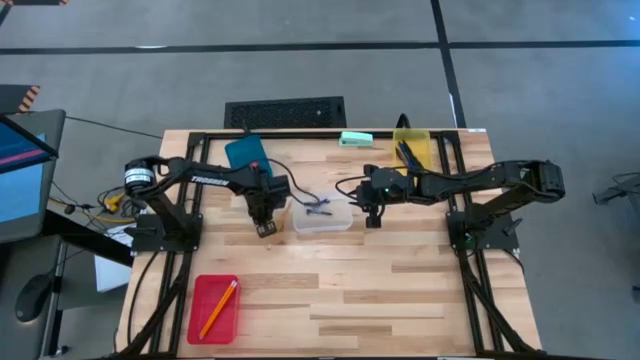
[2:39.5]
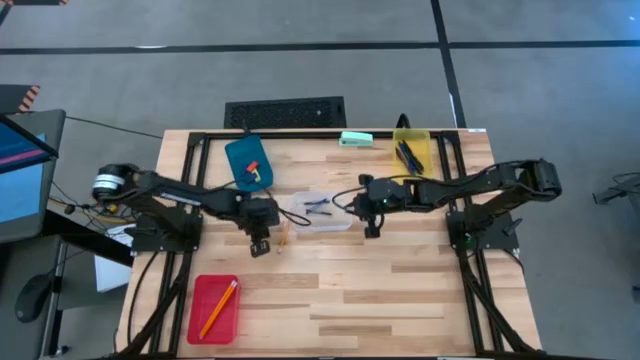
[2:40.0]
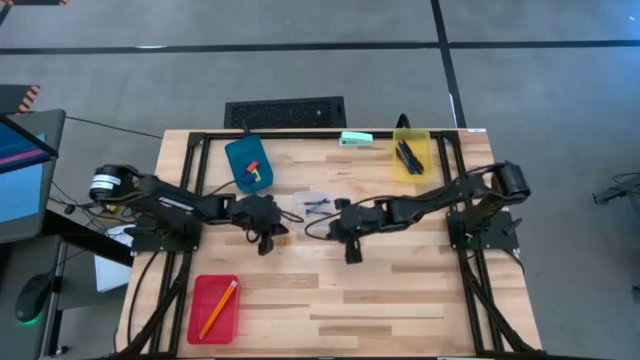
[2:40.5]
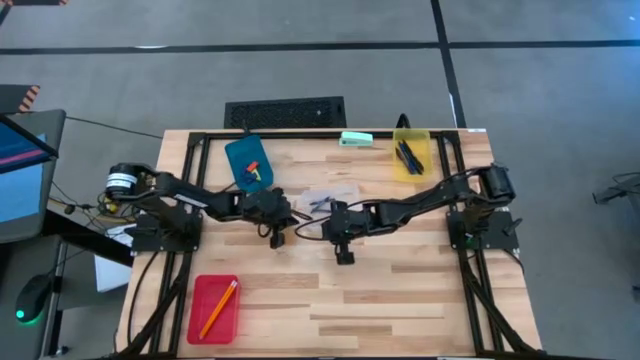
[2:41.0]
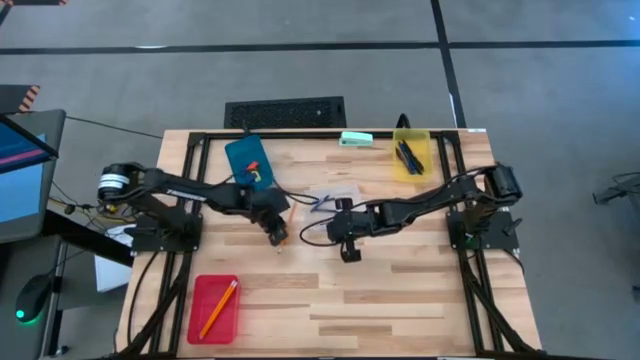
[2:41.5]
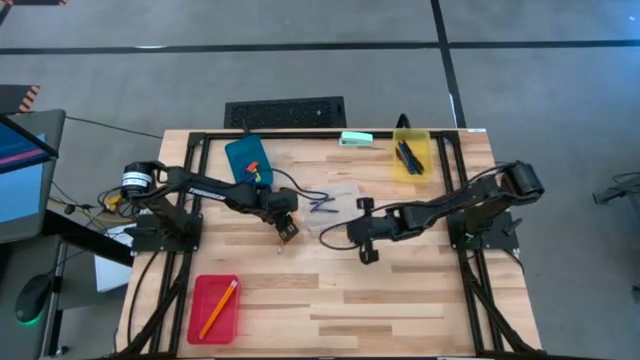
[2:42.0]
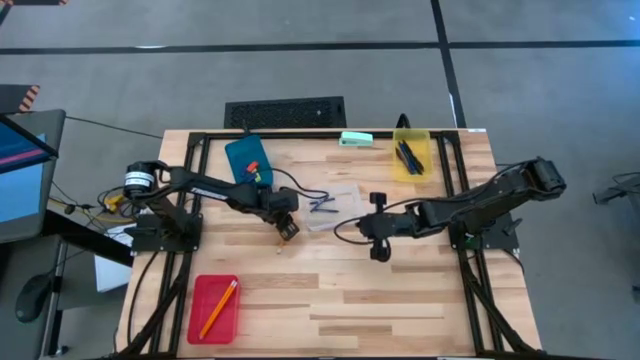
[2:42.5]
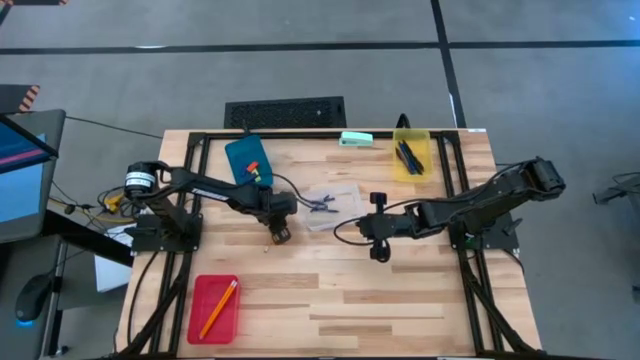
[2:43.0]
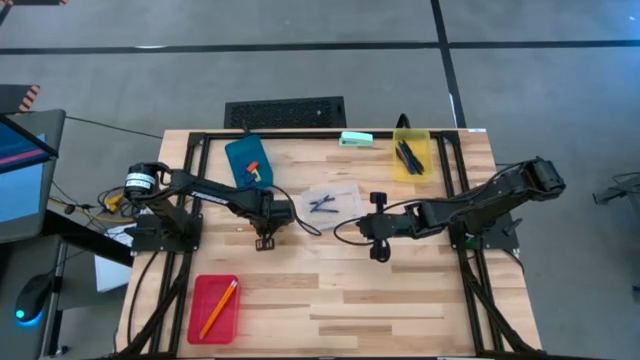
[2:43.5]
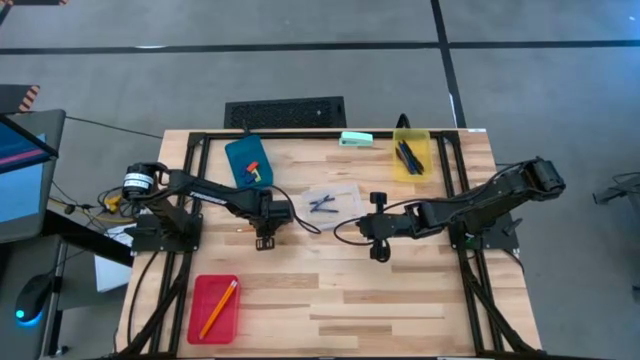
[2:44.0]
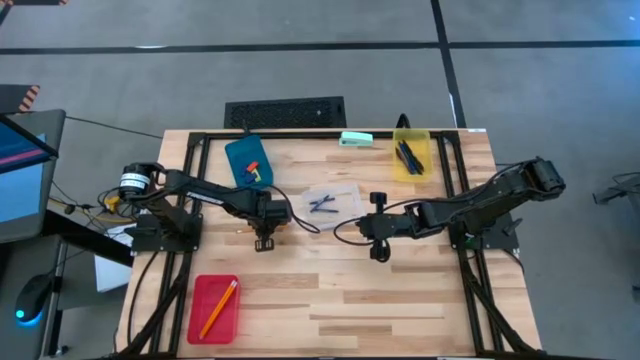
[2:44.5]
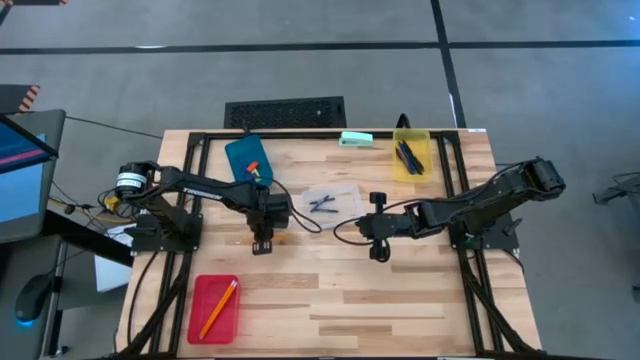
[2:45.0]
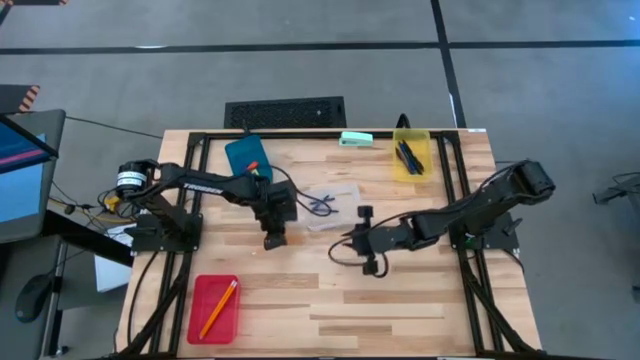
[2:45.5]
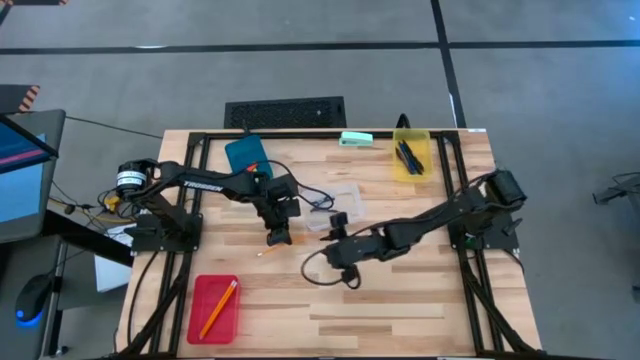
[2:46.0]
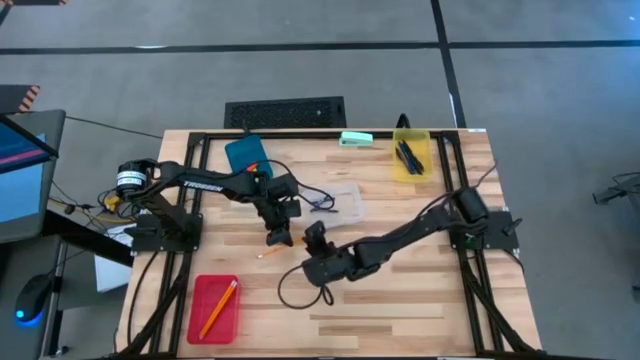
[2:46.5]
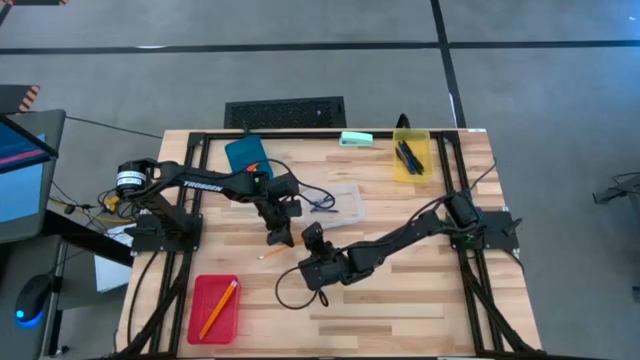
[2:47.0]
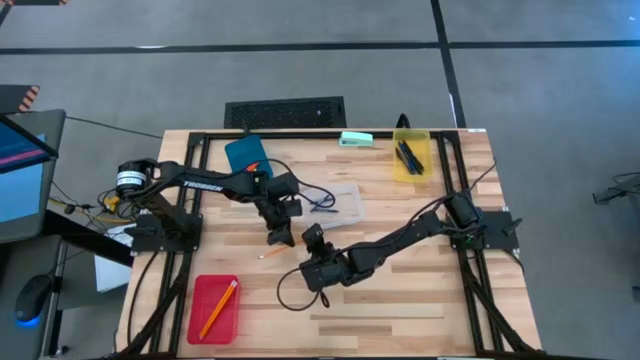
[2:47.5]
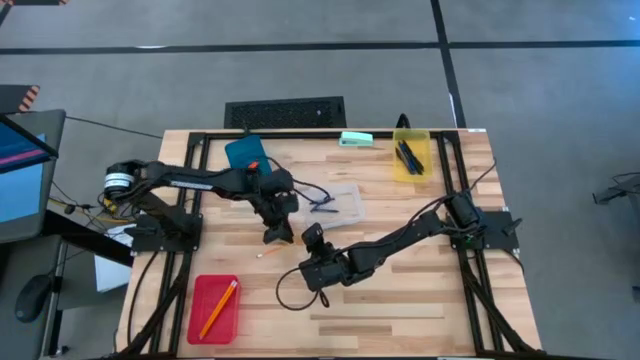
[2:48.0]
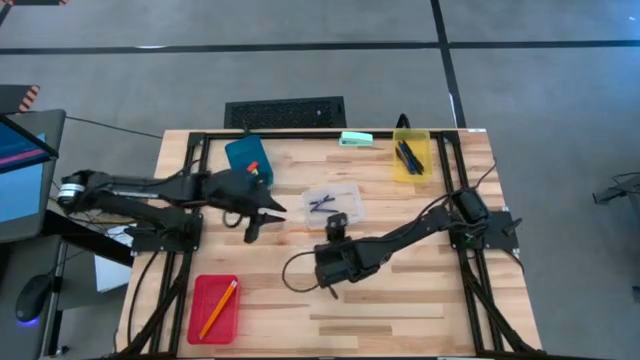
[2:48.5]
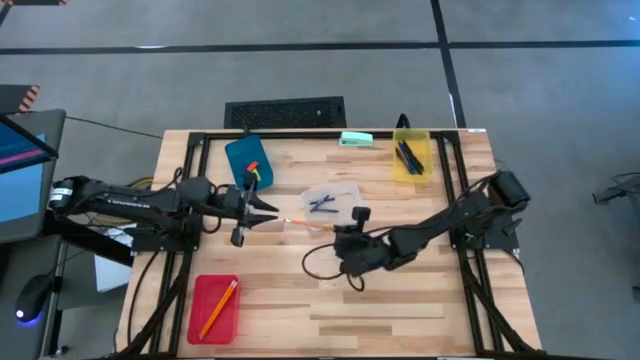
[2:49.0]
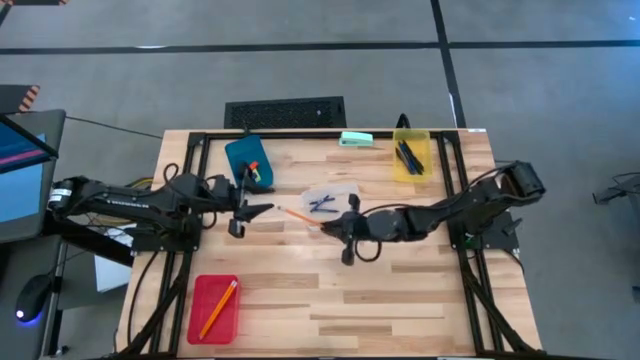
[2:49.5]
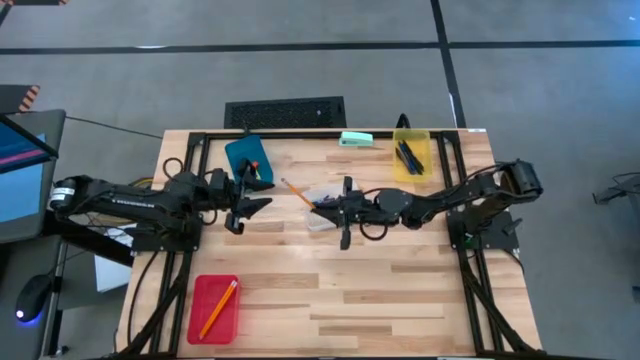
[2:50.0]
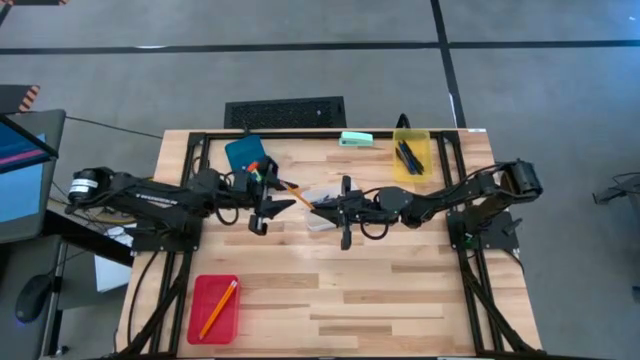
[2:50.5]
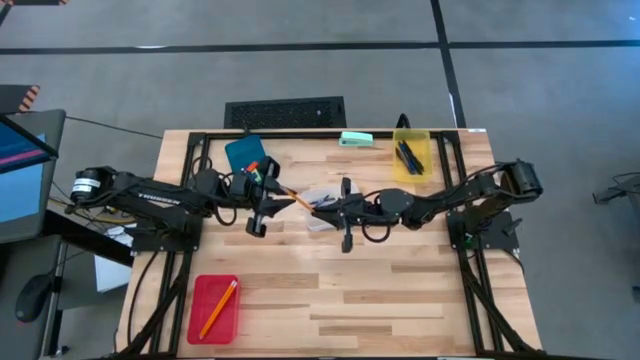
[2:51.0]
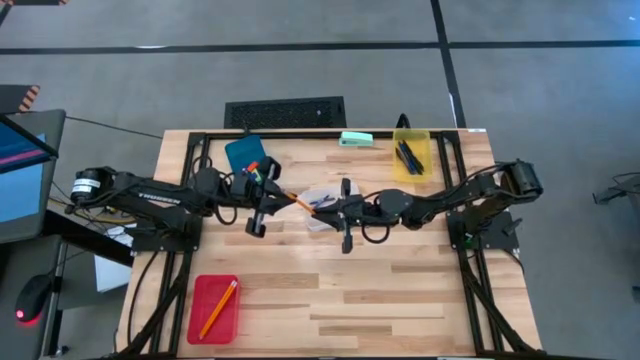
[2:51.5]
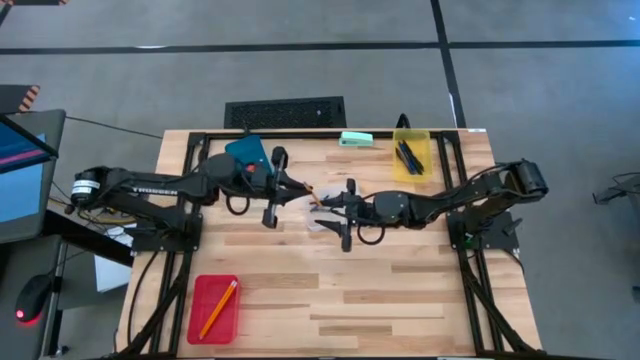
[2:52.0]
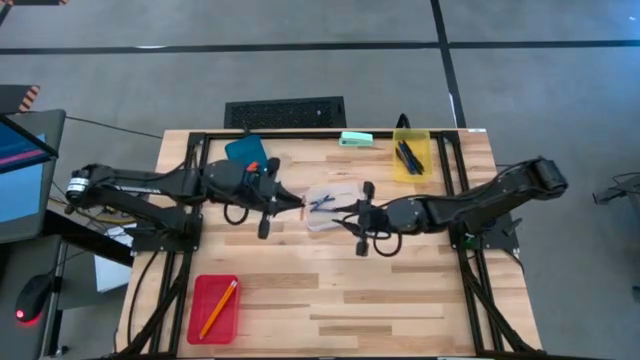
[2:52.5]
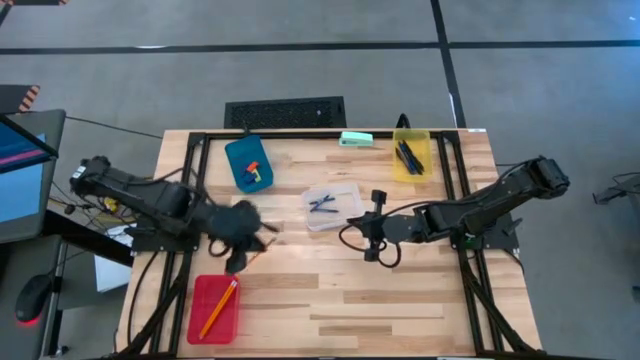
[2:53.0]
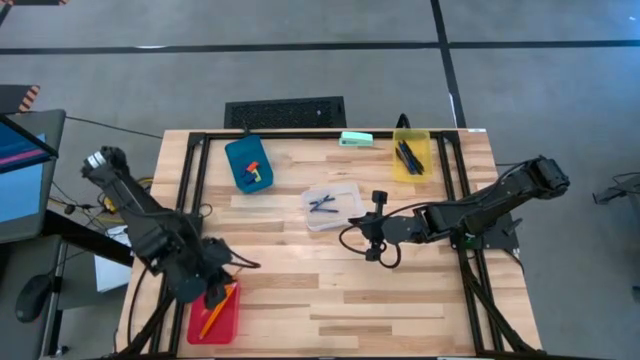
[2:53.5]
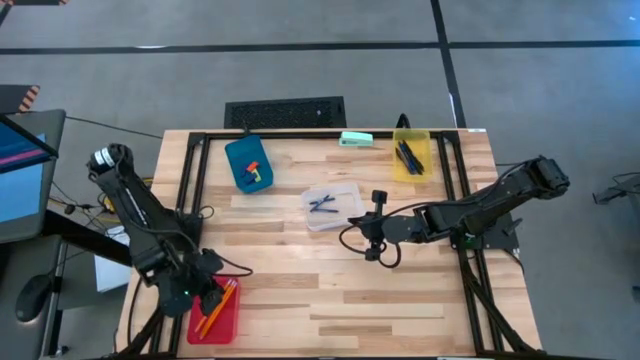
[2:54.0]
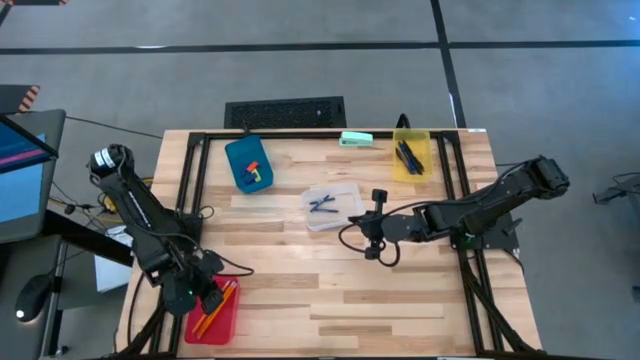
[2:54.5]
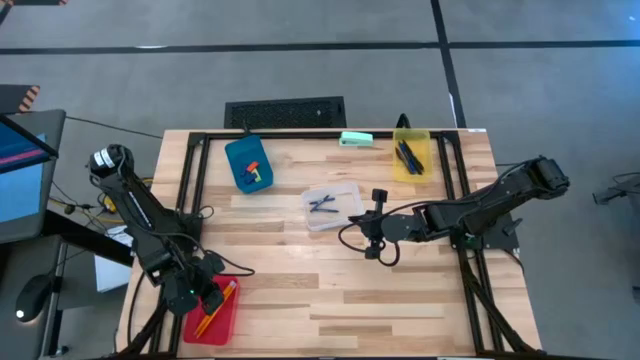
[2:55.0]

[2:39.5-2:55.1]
Task: Sort crayons/erasers/pens/pencils in bins
Put the yellow pencil into the red bin

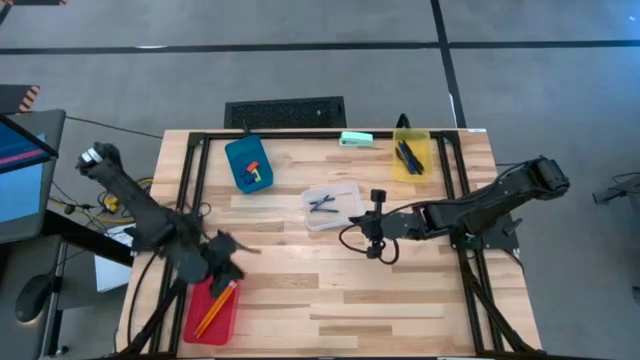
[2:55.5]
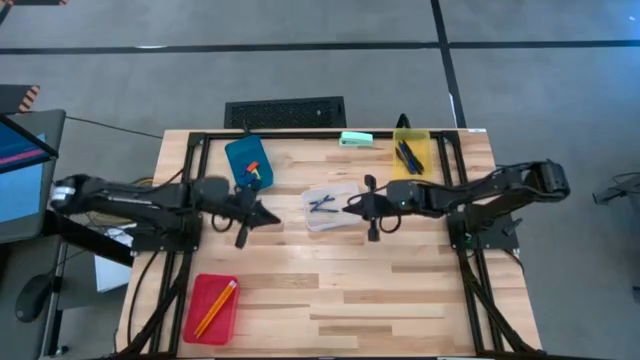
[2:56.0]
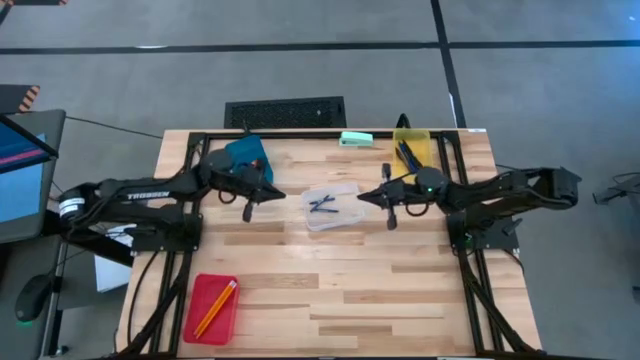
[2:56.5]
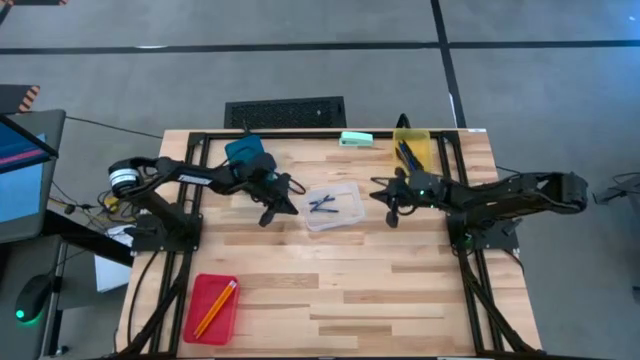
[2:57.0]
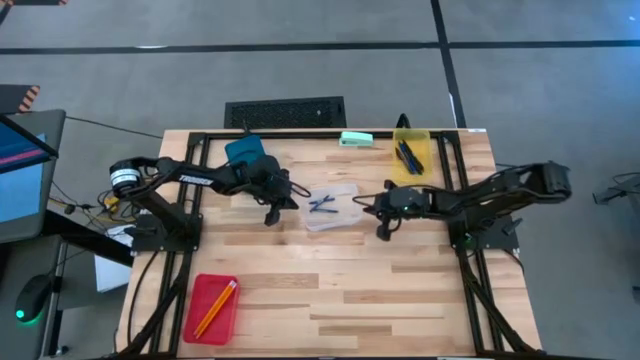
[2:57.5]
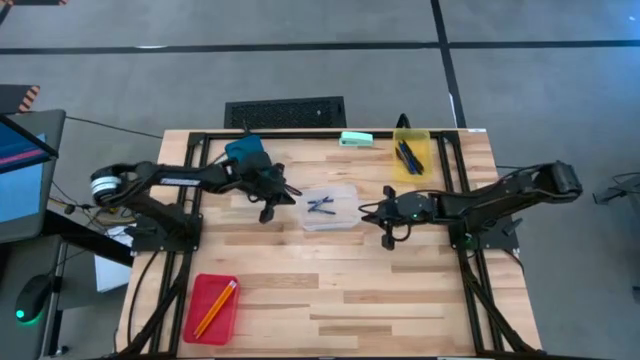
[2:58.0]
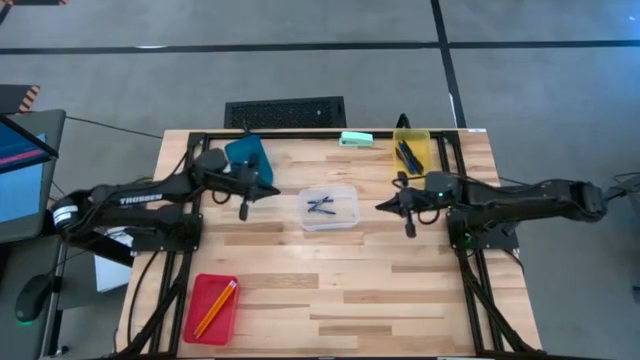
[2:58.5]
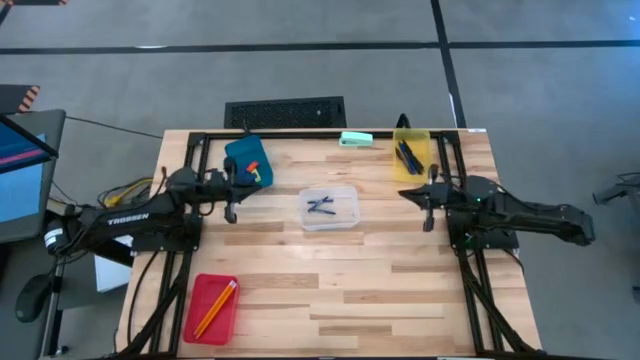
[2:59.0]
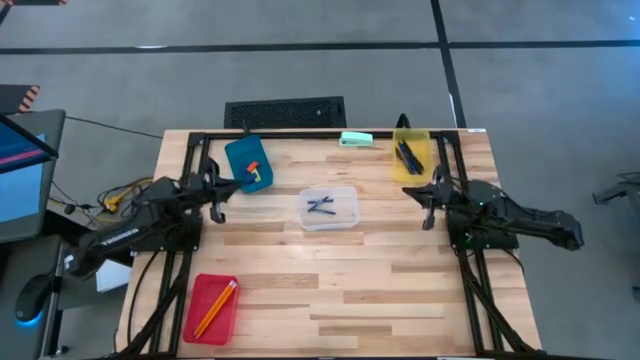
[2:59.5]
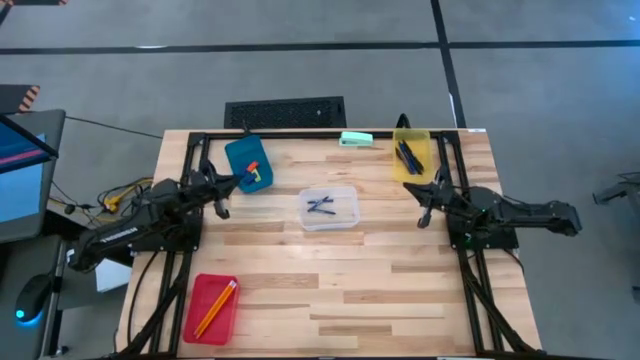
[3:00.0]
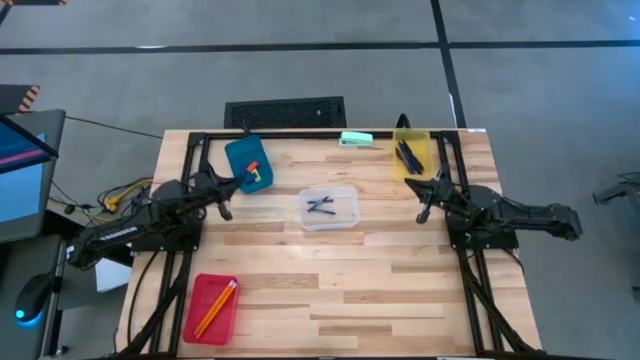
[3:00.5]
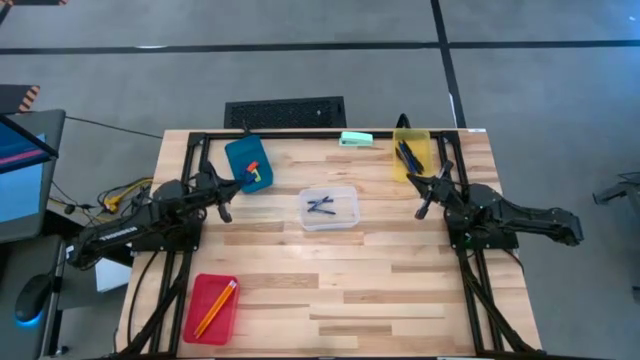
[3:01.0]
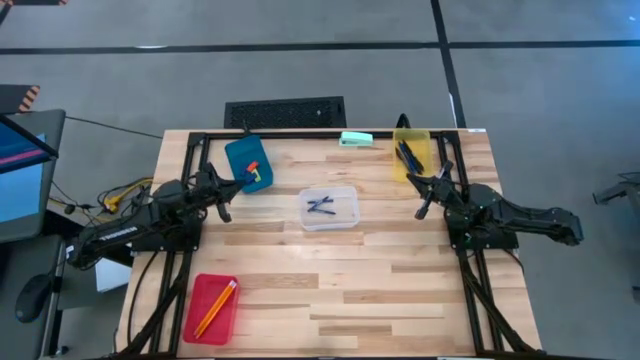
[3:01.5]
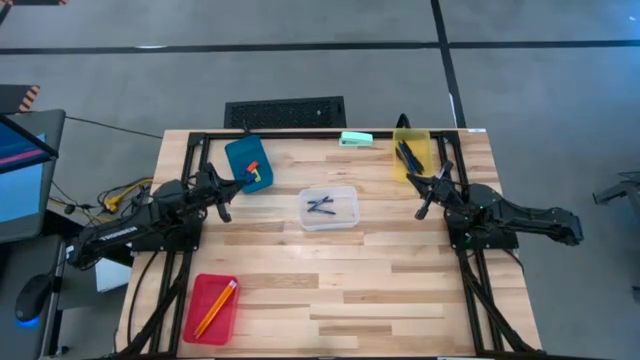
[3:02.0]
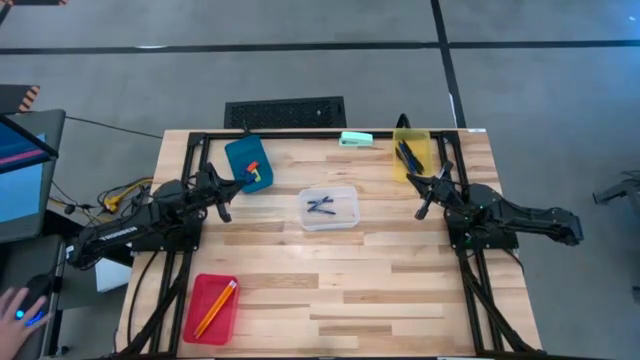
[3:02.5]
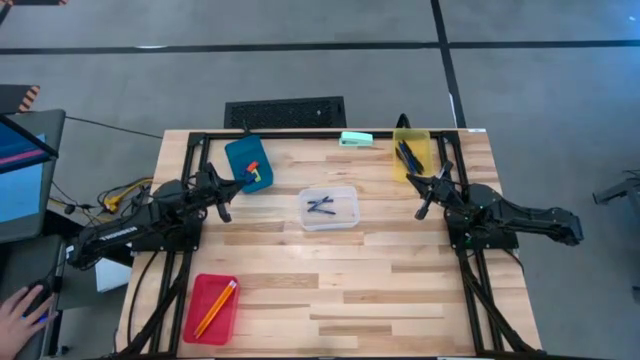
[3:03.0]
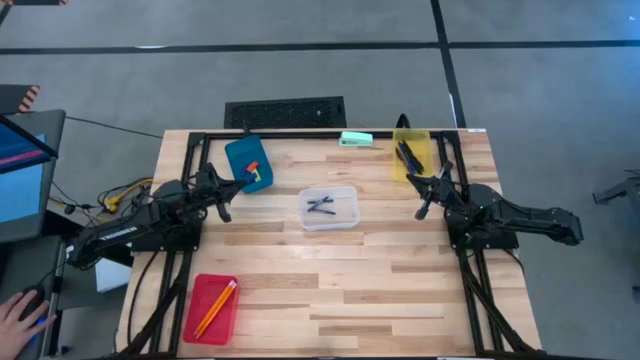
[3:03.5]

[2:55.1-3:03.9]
Return to Home Position
